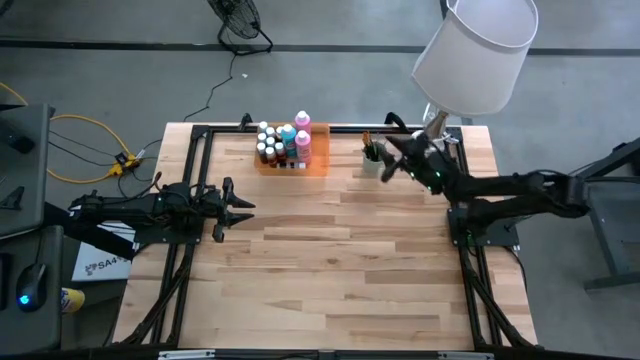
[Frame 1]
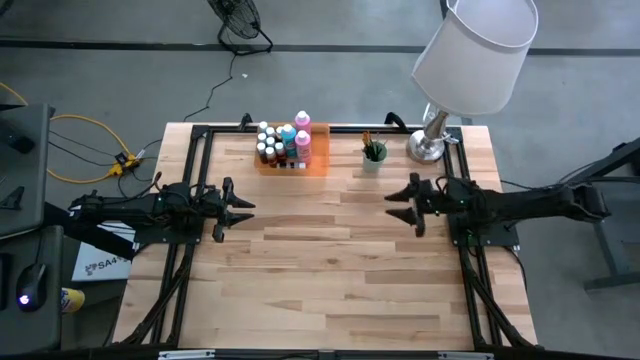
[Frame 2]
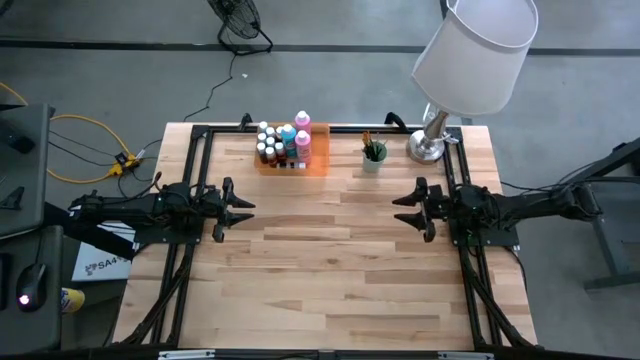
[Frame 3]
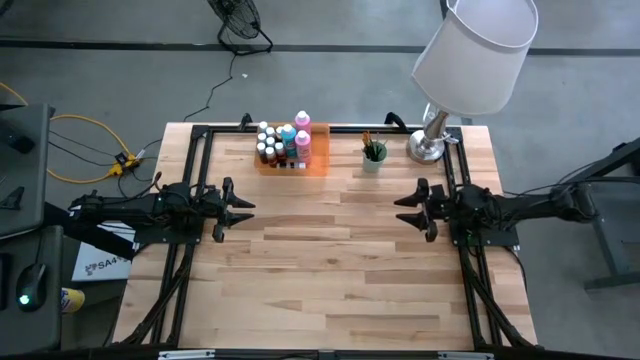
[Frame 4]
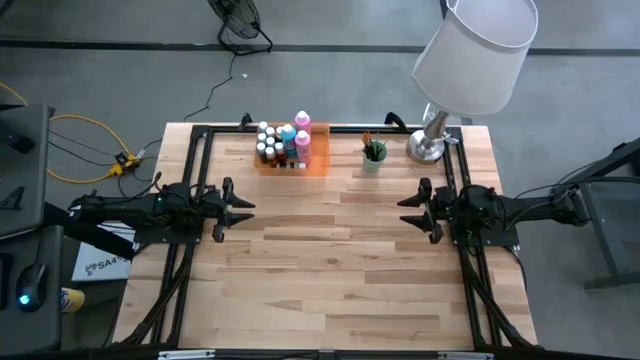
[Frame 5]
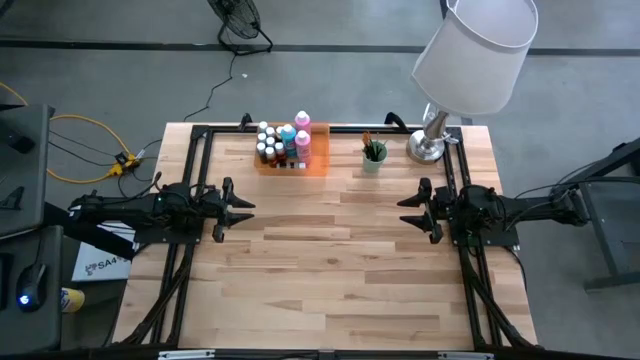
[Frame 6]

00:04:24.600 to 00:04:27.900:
Task: Pick & Place Paint Supplies
Return to Home Position

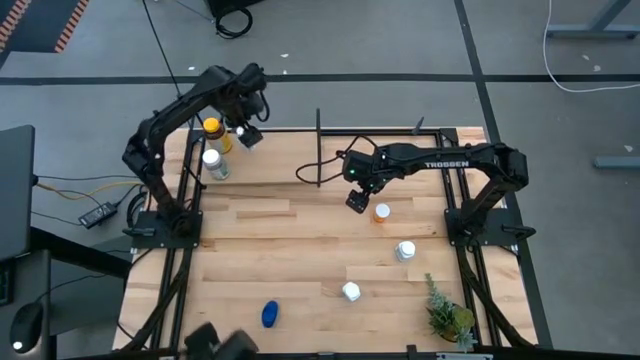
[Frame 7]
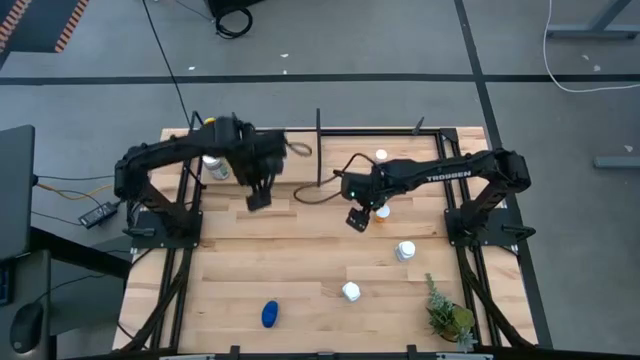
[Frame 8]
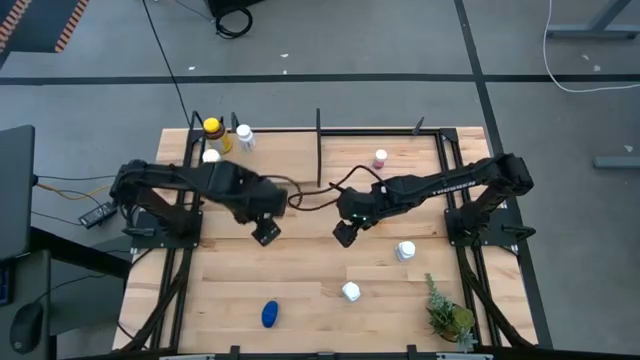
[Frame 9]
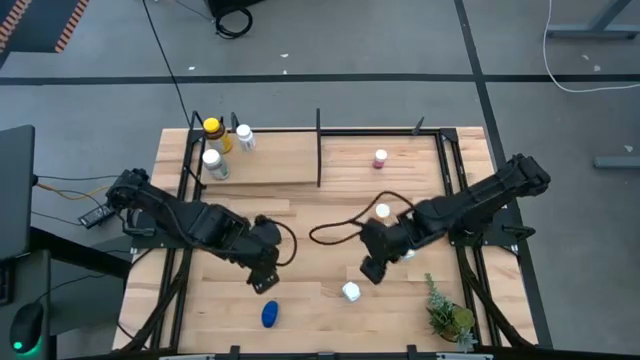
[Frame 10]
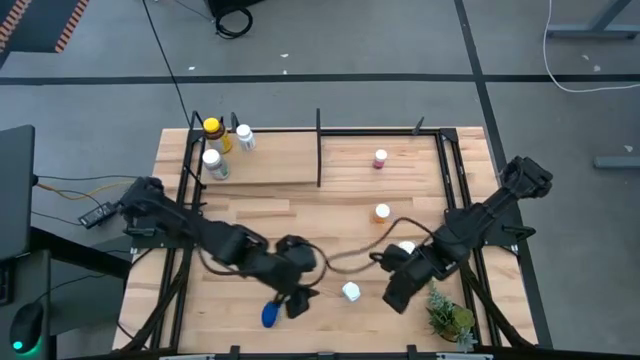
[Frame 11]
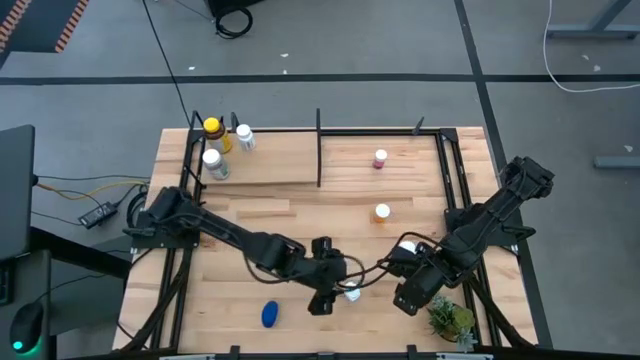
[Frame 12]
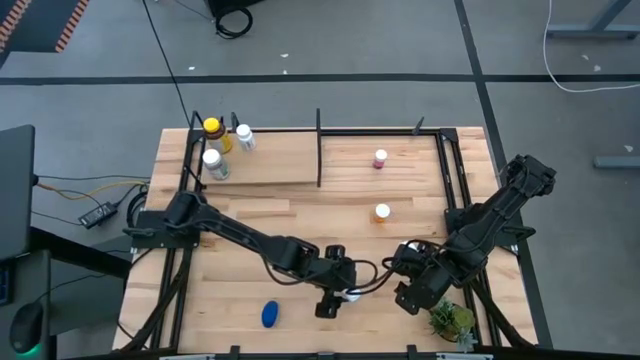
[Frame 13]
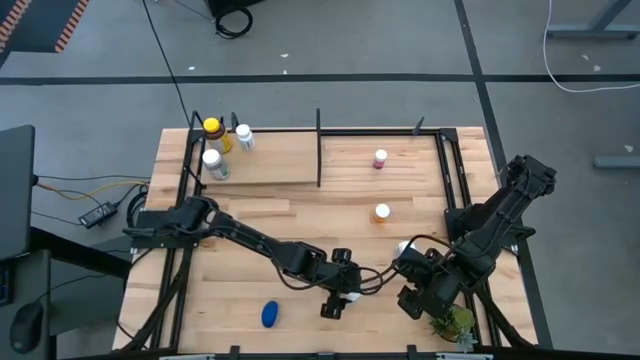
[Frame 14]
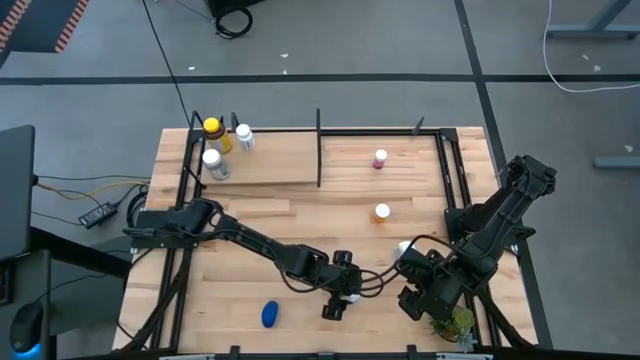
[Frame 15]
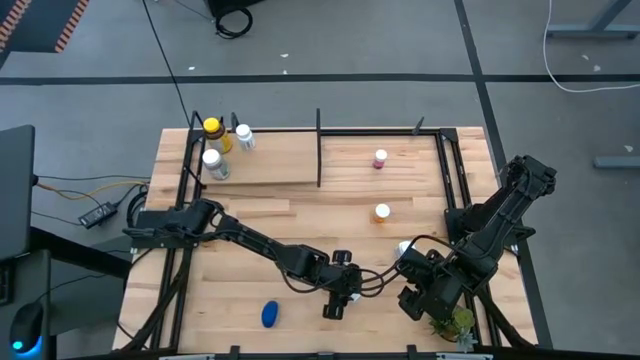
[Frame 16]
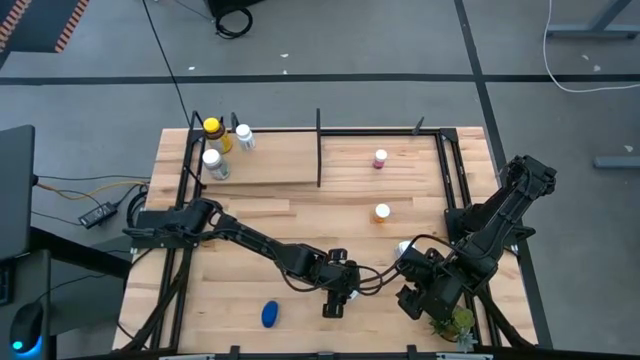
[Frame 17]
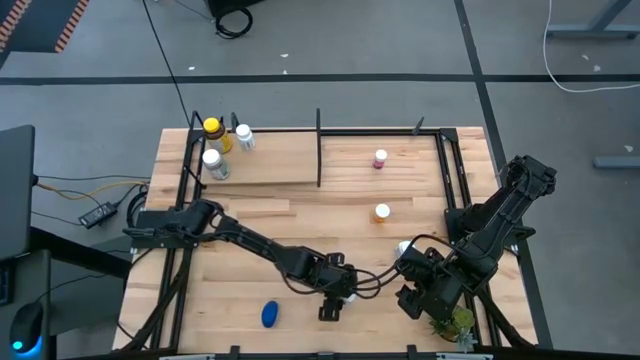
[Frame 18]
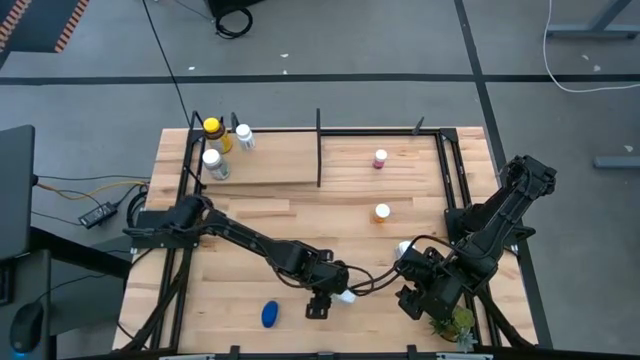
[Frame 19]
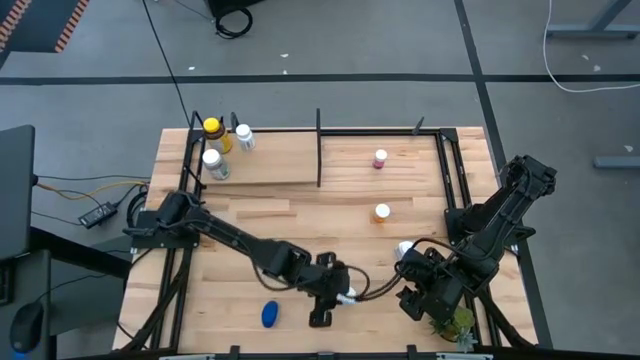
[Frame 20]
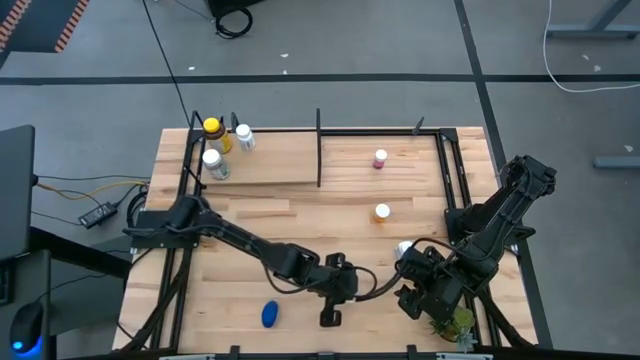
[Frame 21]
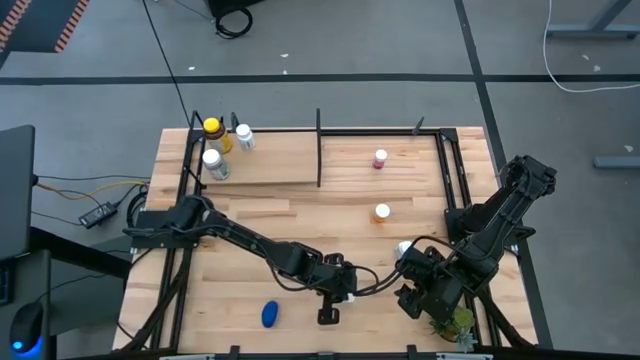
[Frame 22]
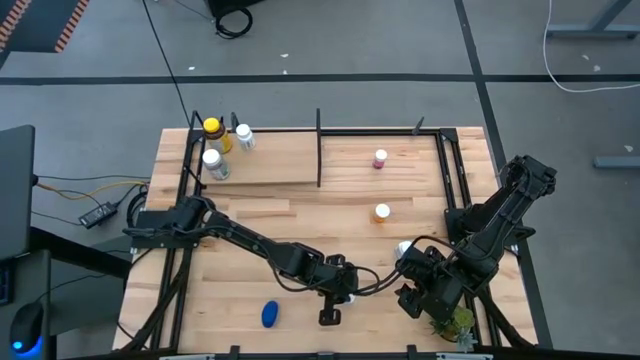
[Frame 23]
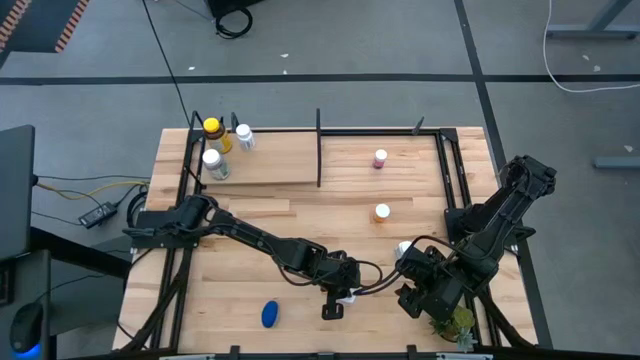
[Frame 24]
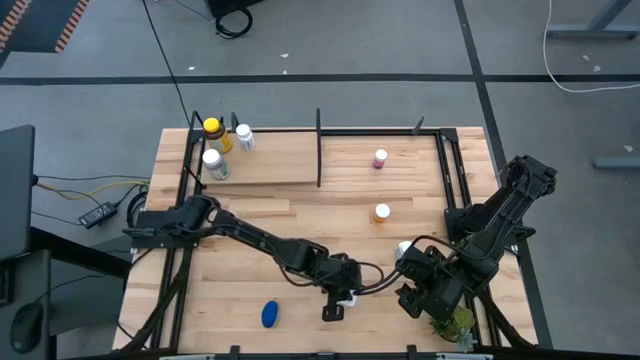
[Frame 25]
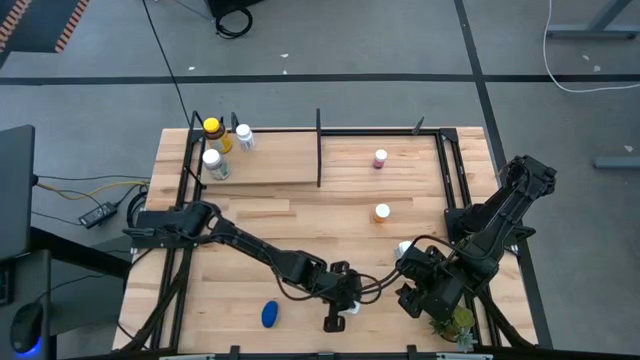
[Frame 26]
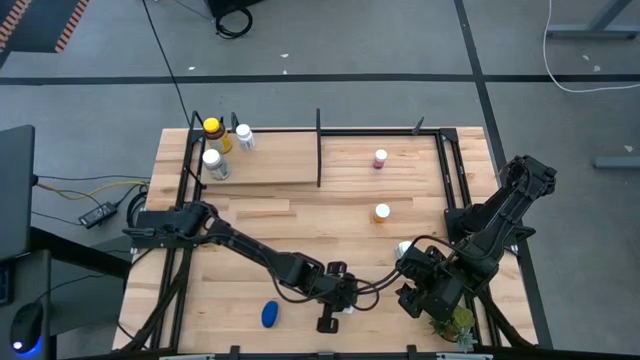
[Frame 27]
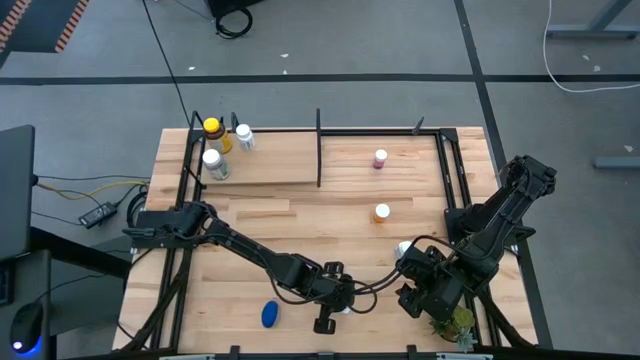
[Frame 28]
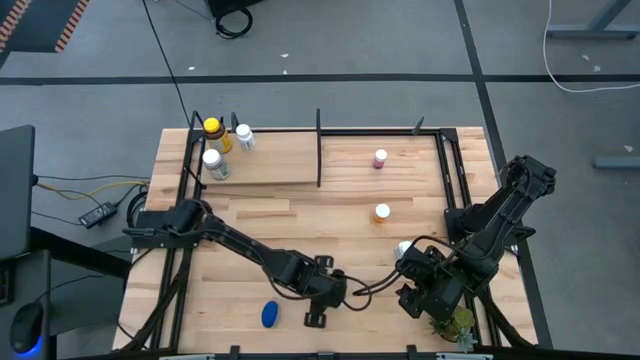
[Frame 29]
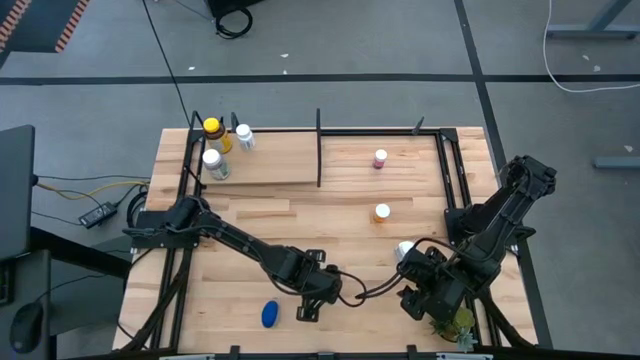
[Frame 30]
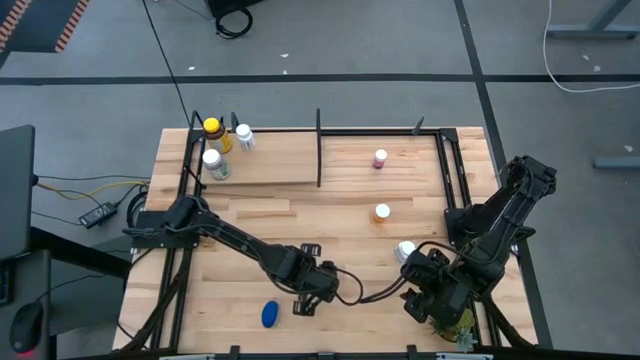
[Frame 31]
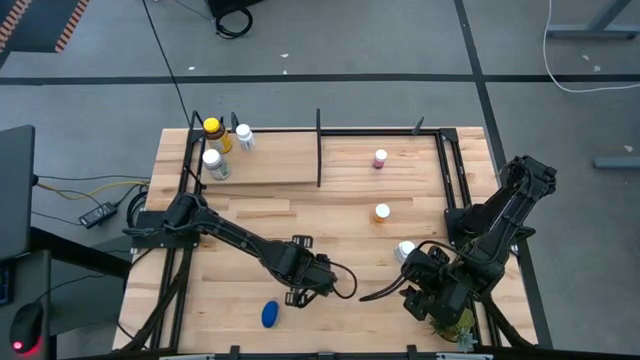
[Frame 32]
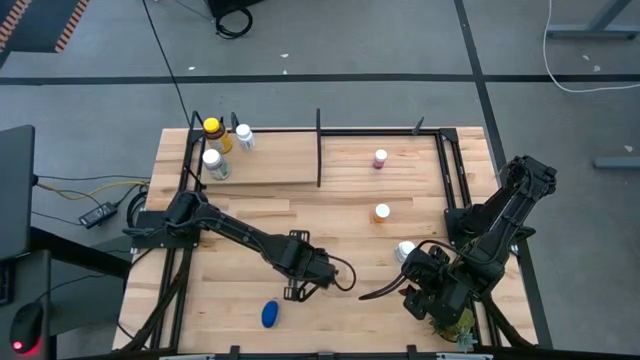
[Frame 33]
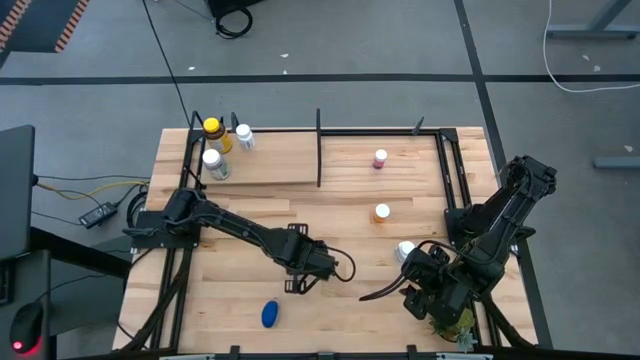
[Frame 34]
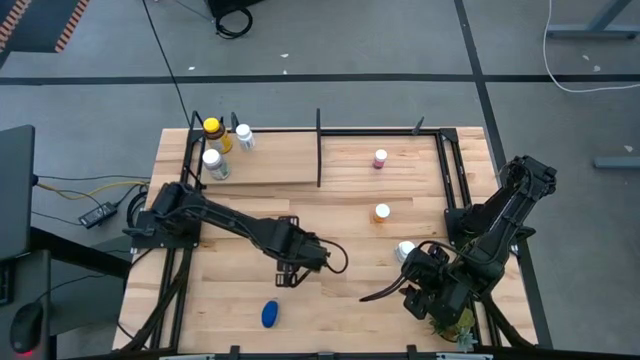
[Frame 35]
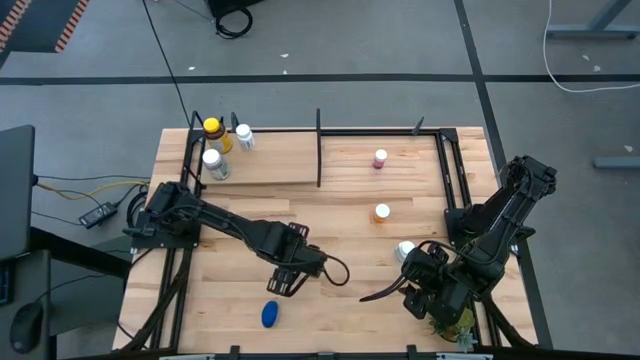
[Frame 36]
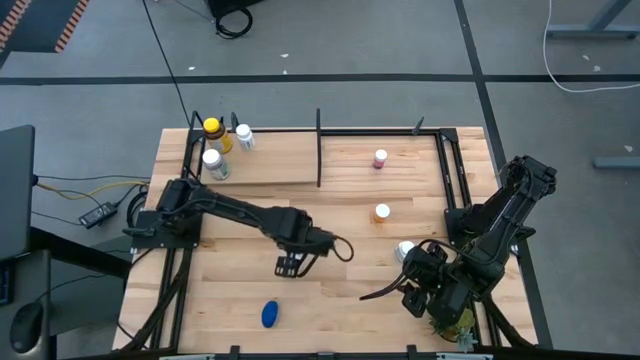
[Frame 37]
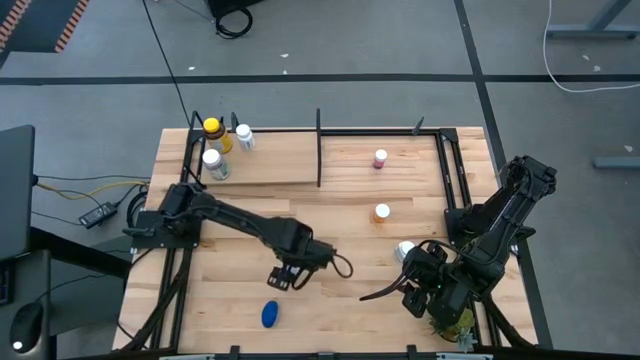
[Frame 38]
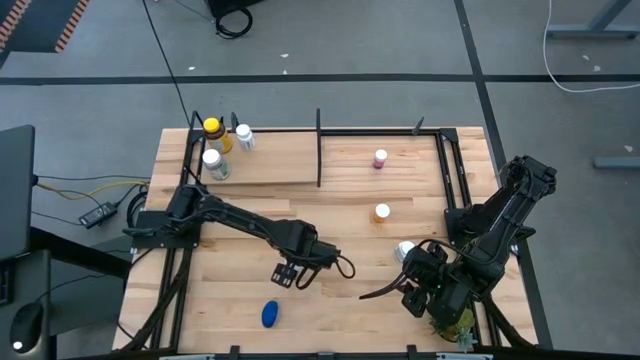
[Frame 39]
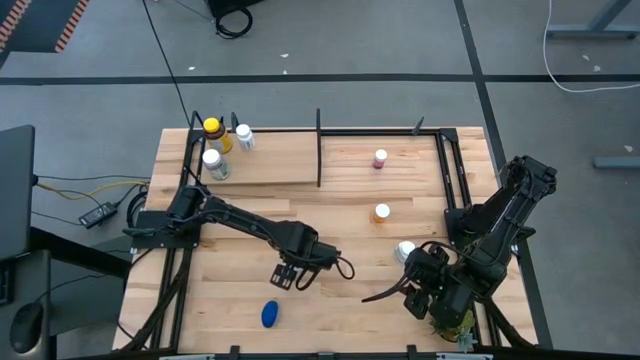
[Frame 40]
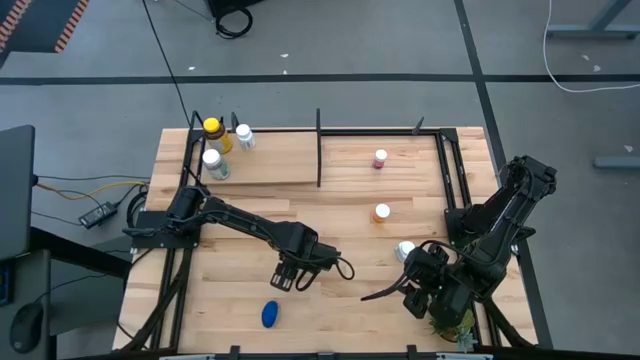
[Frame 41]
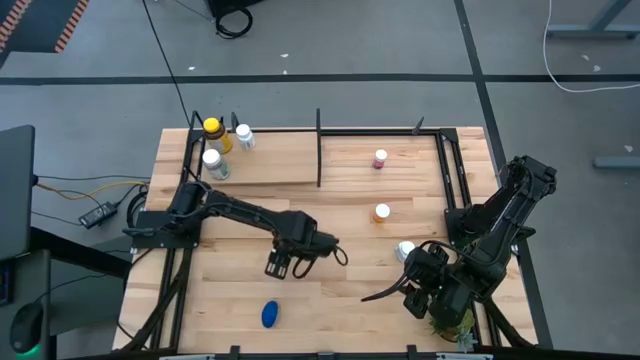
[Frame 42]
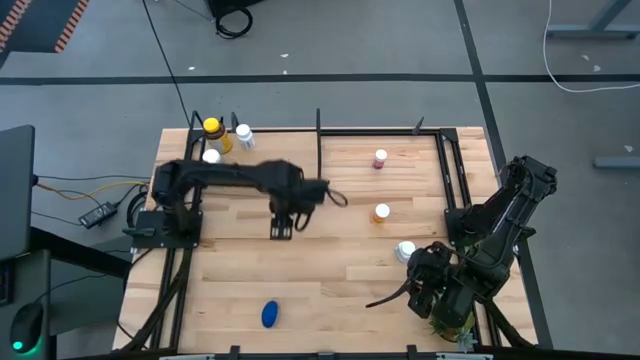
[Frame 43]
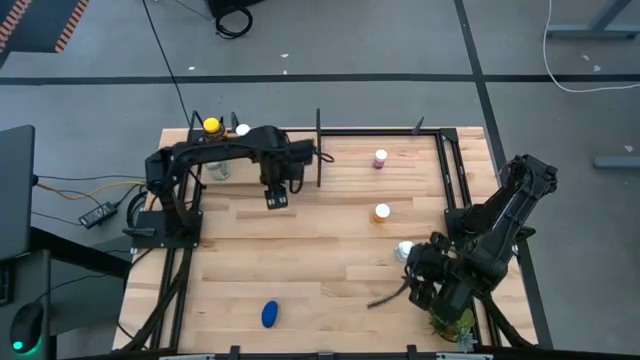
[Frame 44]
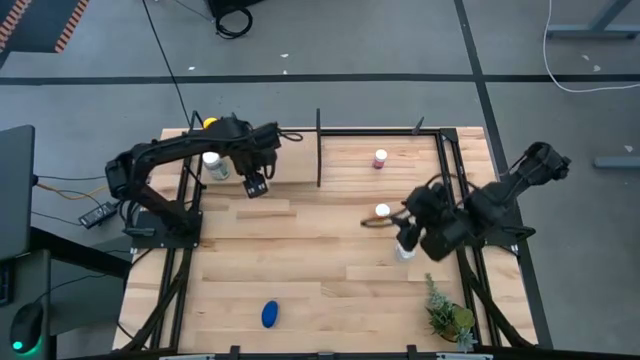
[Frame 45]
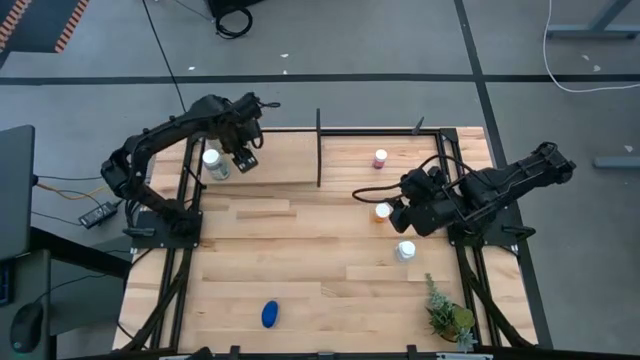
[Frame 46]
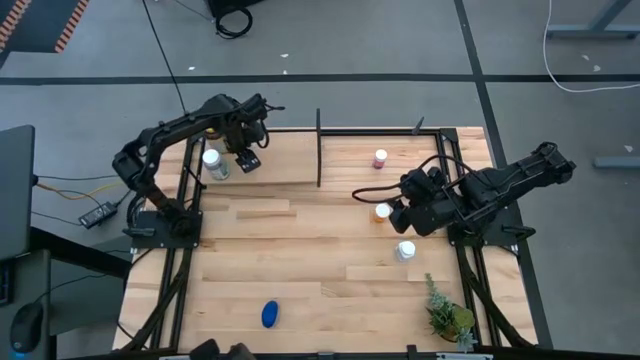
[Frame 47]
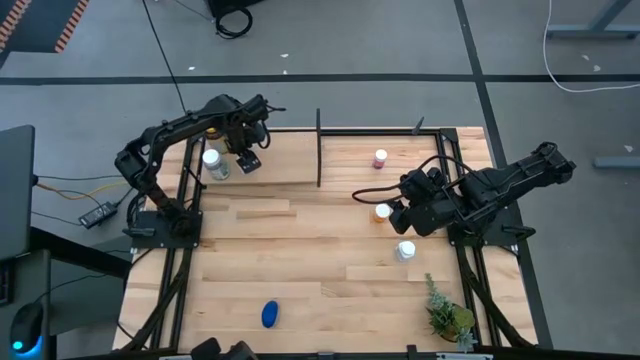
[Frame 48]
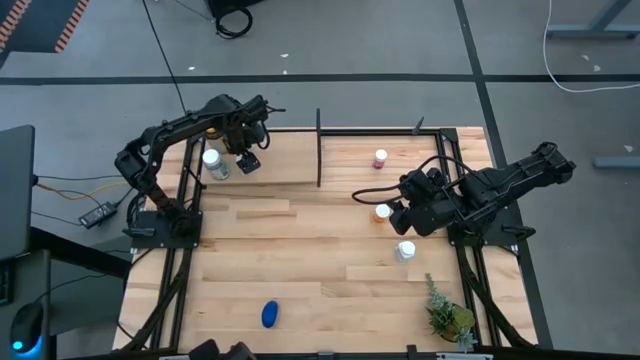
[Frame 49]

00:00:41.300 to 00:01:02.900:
Task: Pick and place medicine bottles onto shelf by color
Put the white and blue medicine bottle on the shelf
